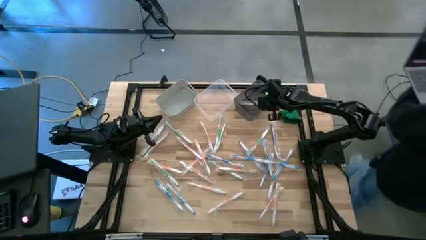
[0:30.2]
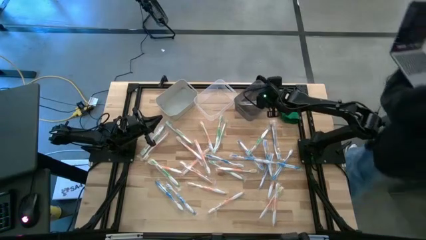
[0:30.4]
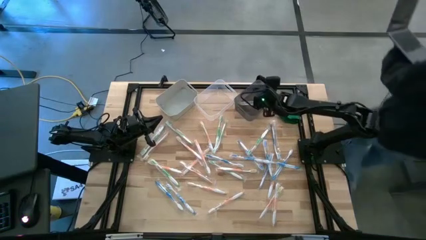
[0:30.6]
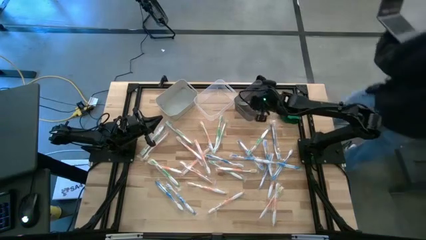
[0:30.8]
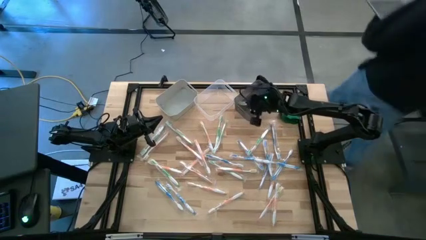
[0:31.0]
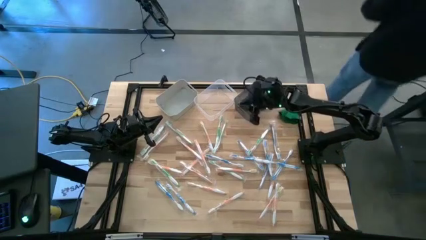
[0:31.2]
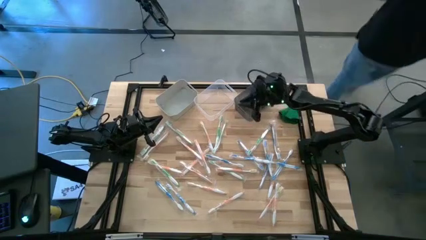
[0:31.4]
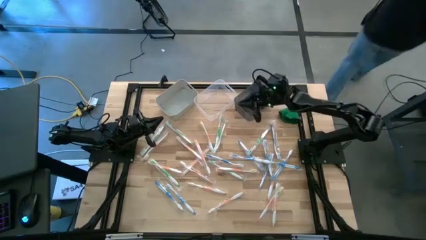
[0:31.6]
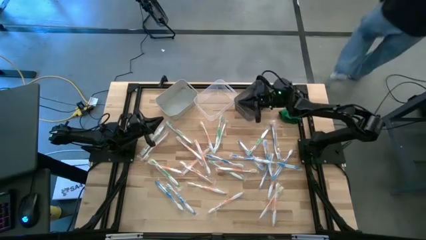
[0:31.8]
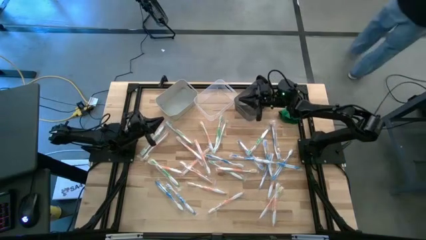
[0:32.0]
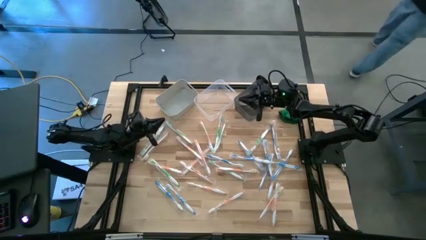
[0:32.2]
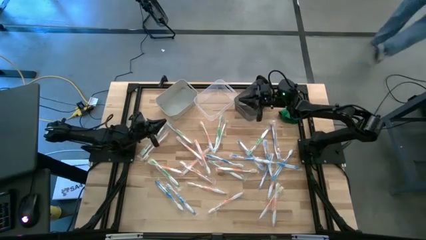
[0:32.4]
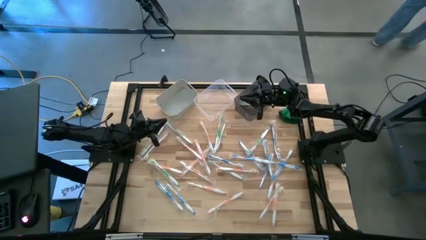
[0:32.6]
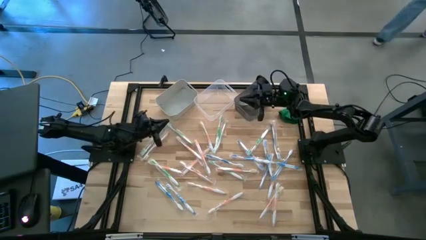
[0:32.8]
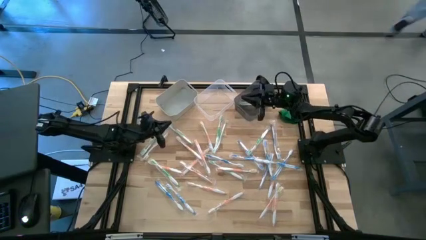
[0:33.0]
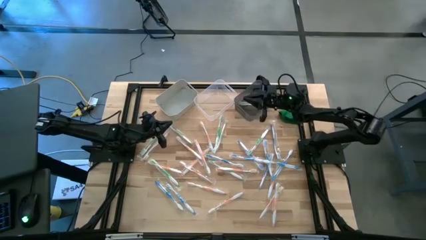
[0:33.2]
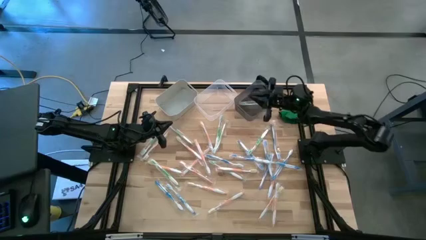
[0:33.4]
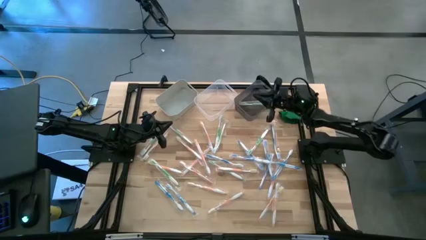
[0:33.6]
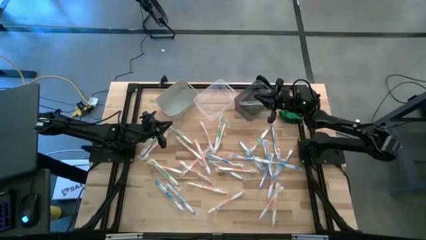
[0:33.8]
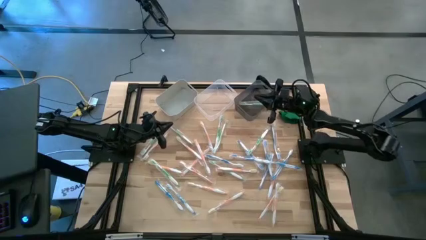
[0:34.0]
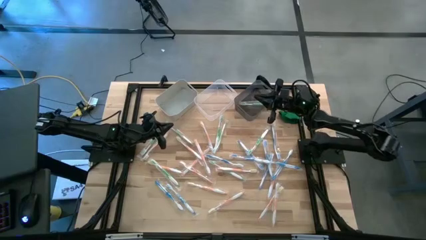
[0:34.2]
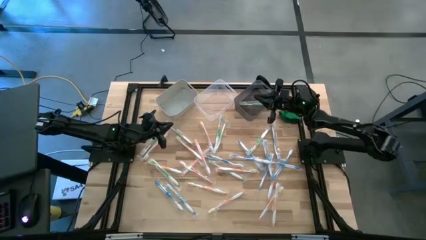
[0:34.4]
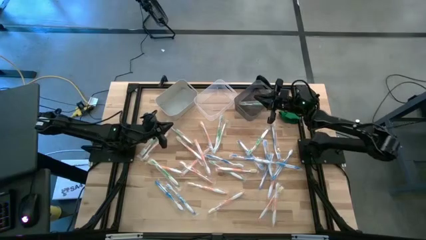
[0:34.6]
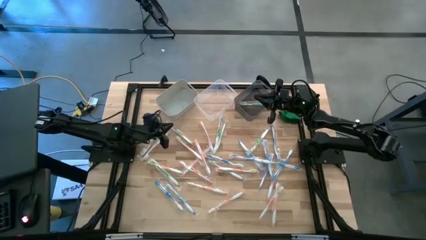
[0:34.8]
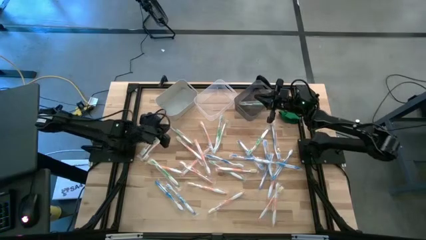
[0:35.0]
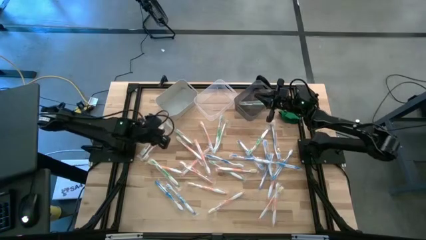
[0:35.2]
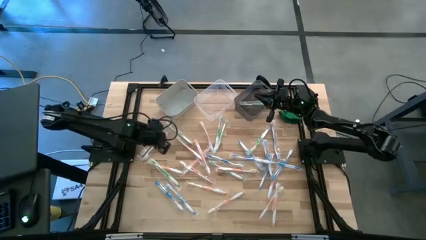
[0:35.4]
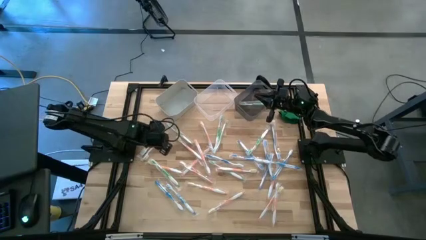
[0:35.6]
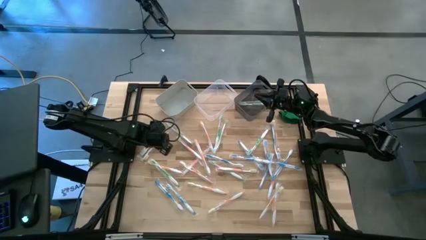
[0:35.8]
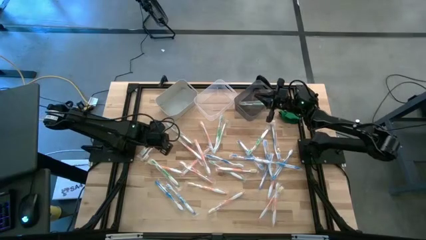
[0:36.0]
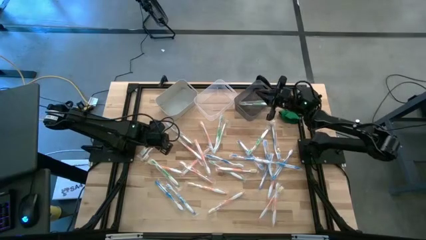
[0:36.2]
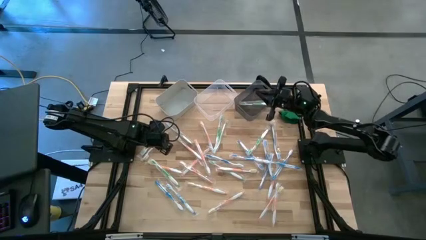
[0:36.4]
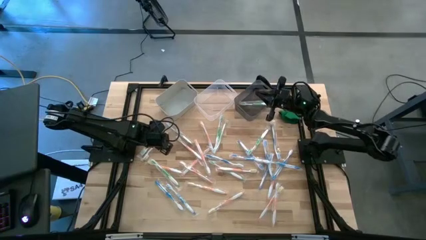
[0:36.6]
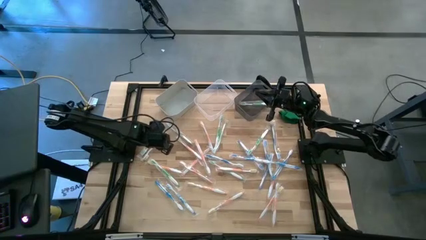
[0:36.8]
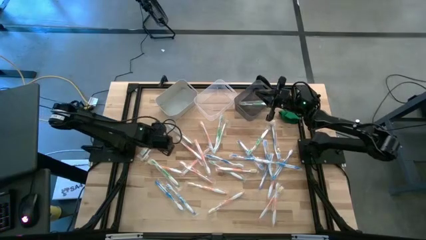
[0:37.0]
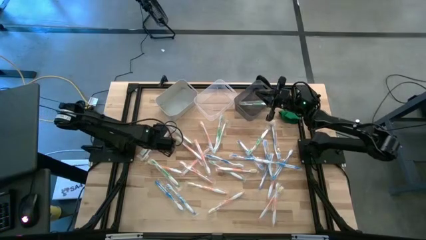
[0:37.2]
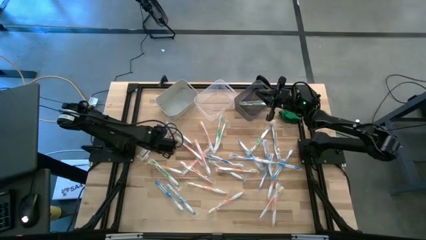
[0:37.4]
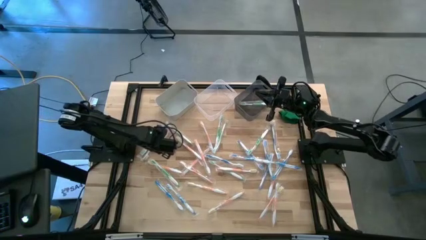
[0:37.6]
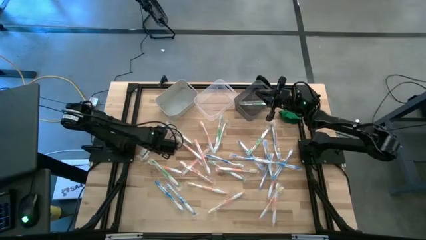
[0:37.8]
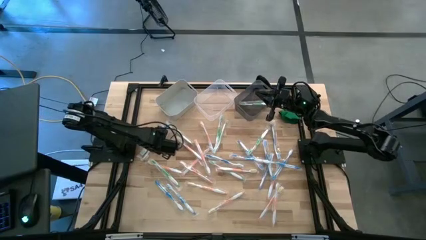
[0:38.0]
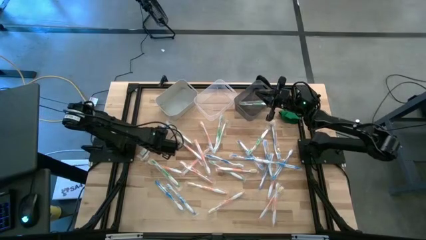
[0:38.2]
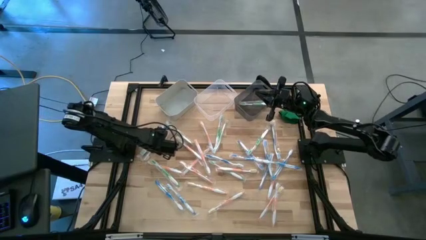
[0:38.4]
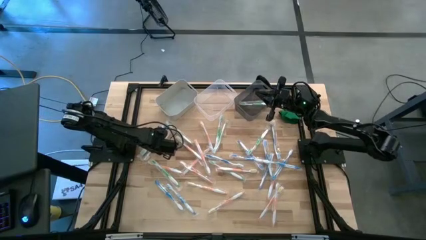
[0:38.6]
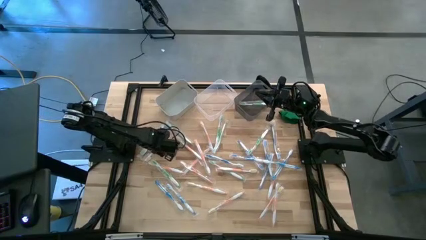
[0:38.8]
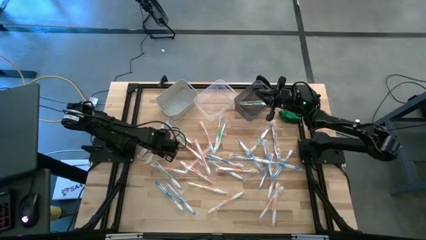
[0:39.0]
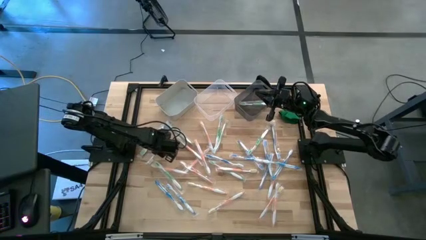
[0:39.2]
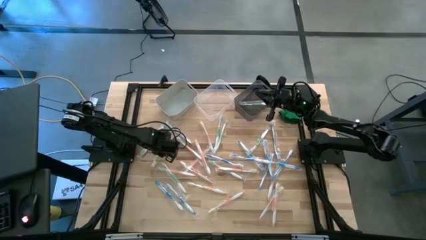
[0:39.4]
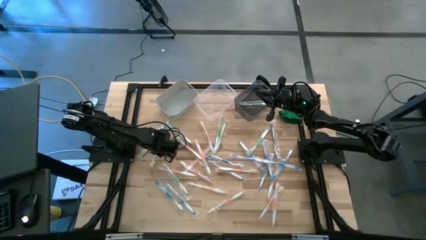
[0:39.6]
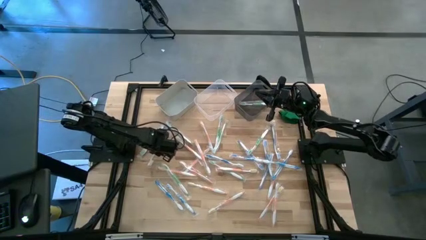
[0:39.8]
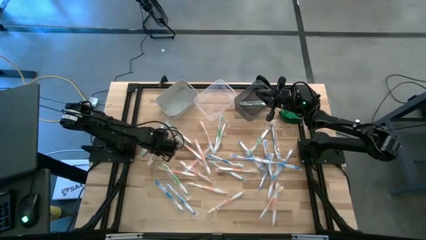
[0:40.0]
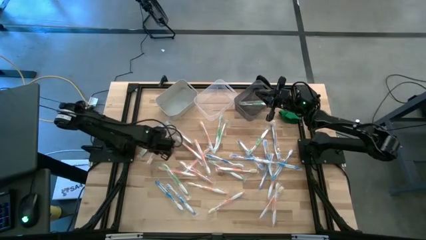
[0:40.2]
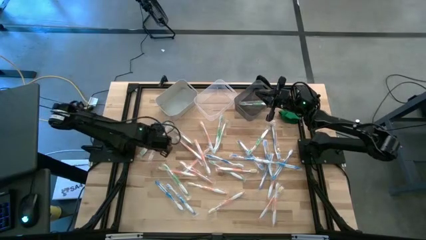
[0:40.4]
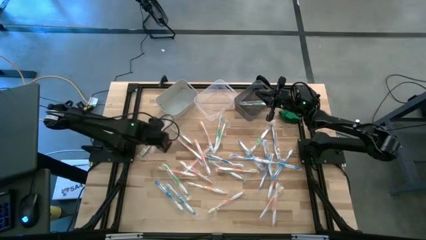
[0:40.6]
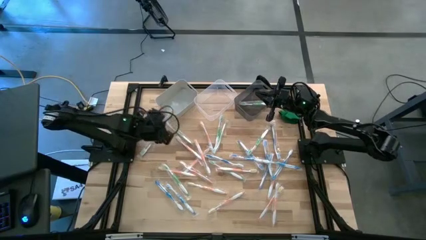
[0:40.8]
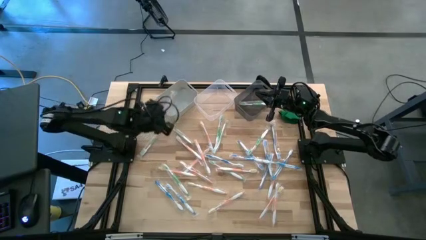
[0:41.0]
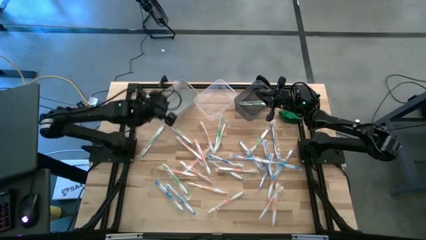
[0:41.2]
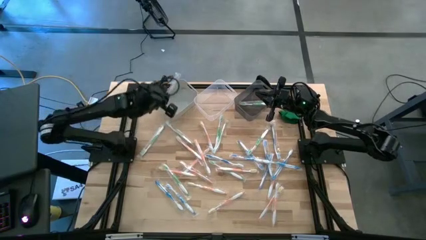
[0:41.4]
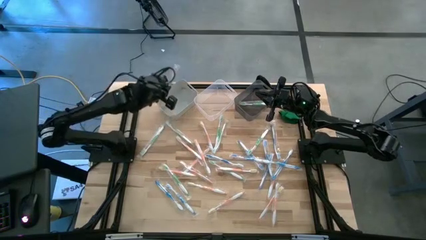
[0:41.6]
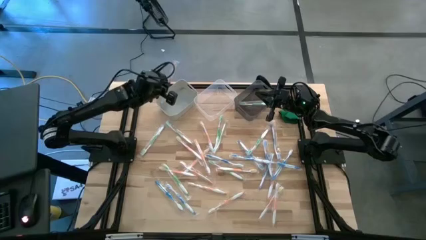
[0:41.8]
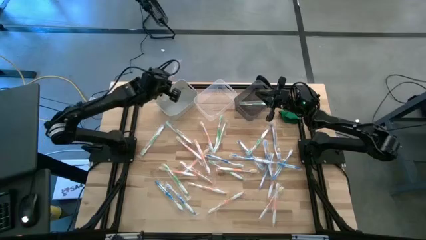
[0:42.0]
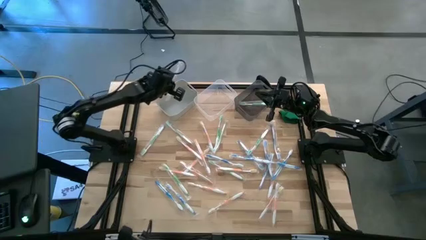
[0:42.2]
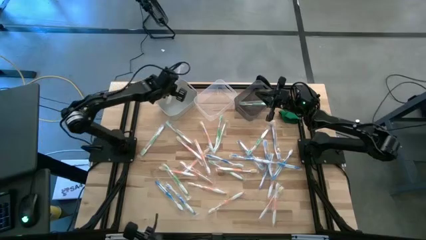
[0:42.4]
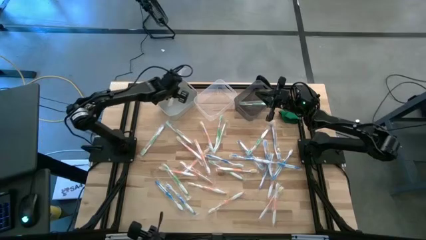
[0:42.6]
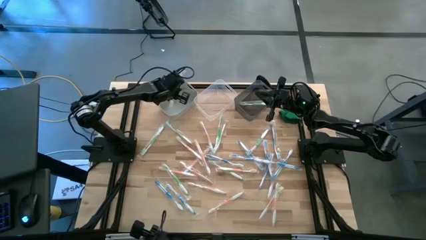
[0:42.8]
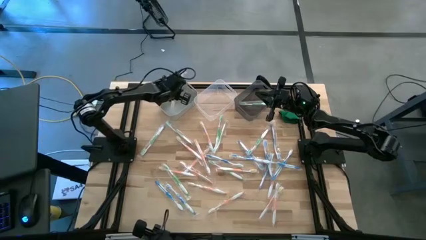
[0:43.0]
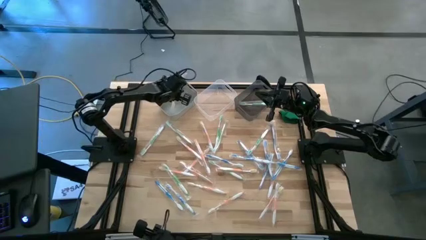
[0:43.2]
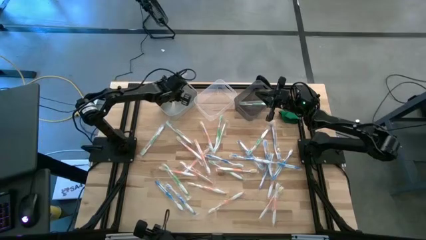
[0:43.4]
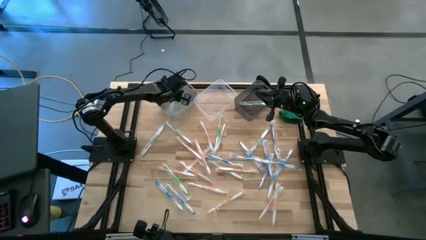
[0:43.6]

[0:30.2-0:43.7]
Task: Pick & Place Toothbrushes
Put the orange toothbrush into the white bin

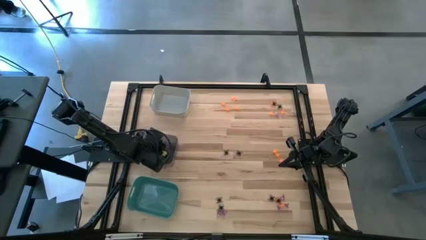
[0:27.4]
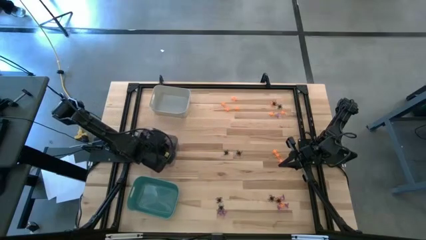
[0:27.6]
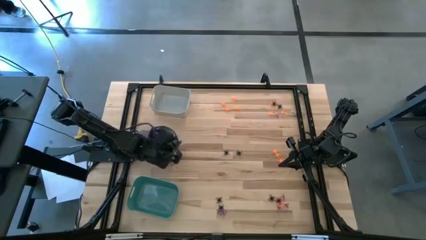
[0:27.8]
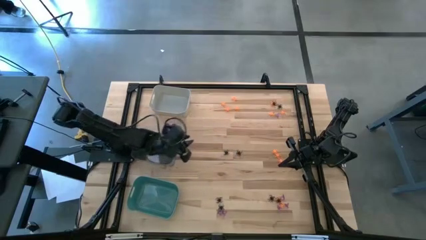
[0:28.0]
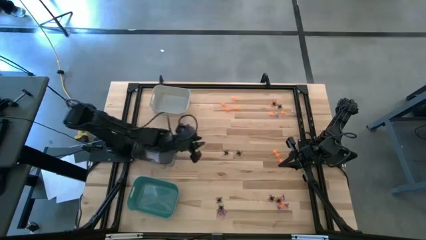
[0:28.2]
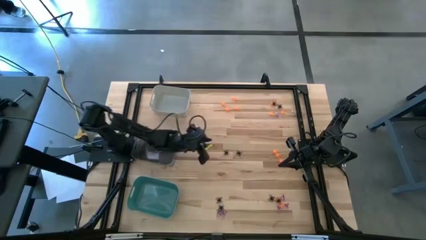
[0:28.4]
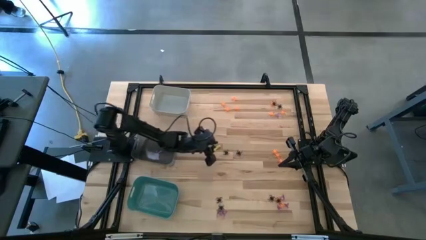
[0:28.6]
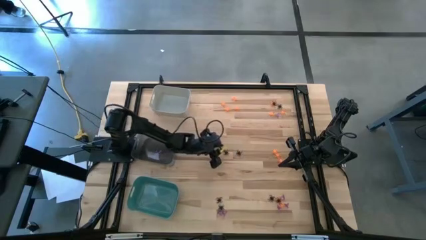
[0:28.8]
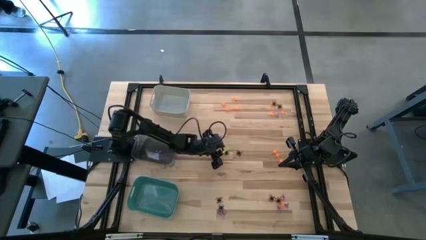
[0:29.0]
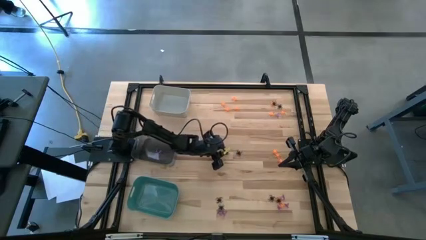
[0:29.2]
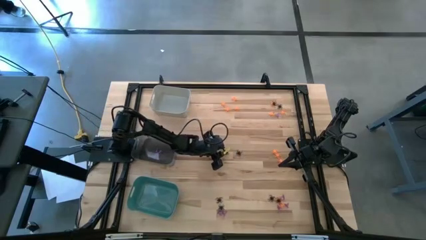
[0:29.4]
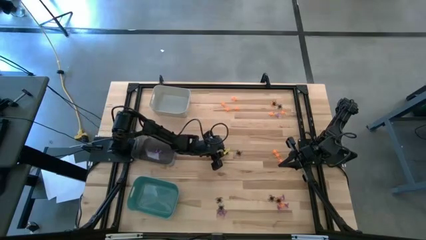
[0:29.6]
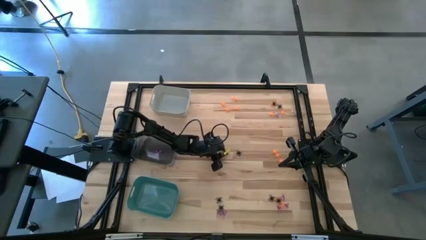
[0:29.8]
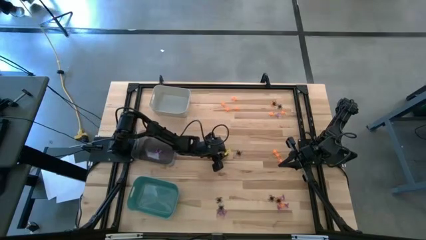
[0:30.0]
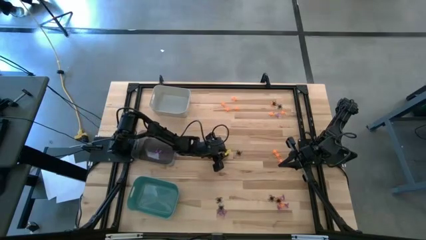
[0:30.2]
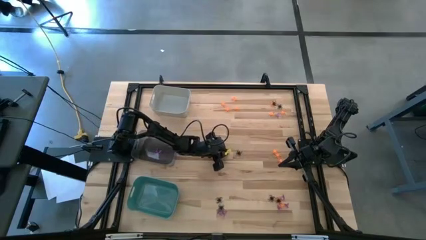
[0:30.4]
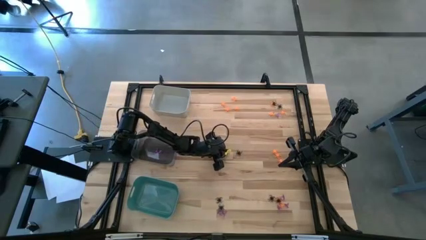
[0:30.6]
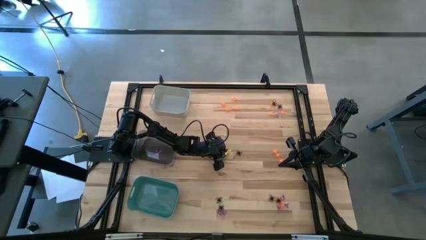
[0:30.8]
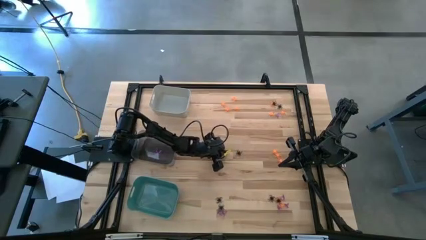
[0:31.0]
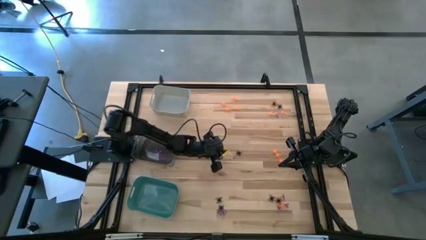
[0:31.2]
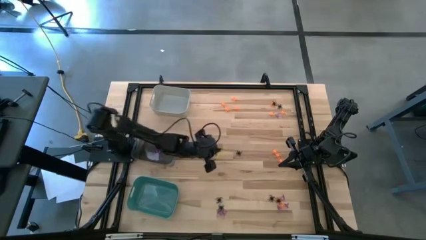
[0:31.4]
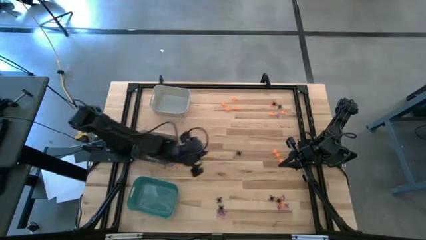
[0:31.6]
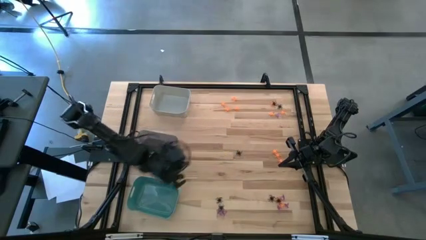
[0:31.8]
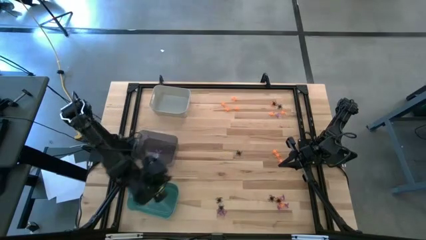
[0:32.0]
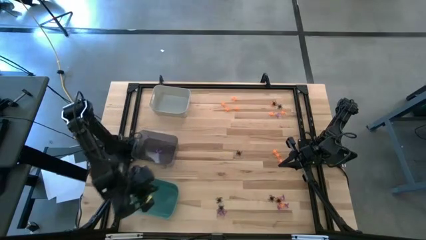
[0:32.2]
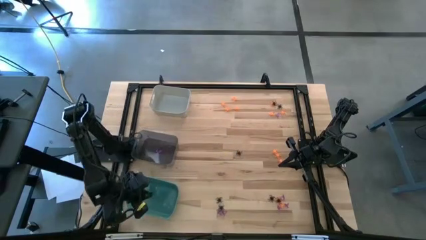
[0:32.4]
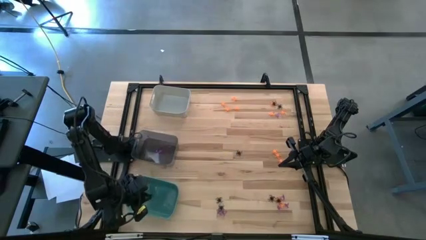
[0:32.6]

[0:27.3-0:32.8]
Task: Sort Halloween decoration
Put the center black spider into the green bin
